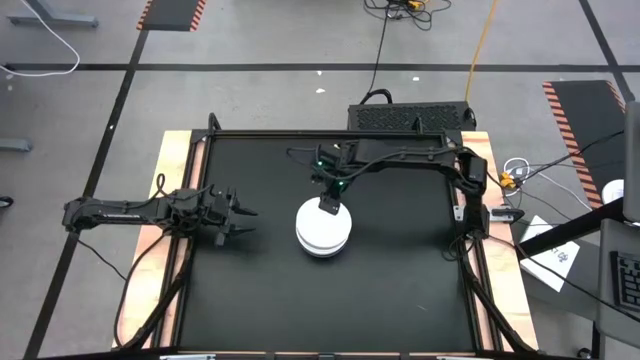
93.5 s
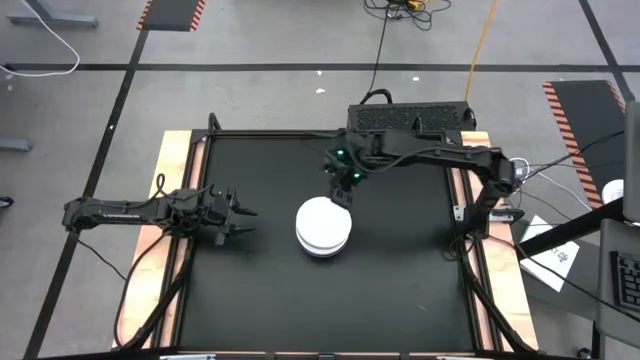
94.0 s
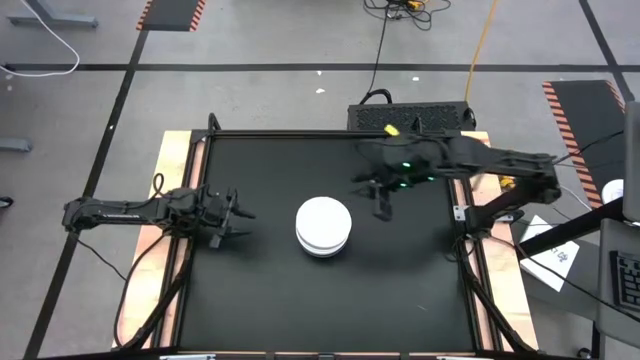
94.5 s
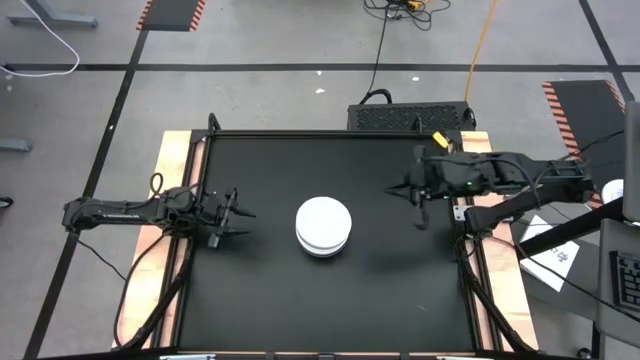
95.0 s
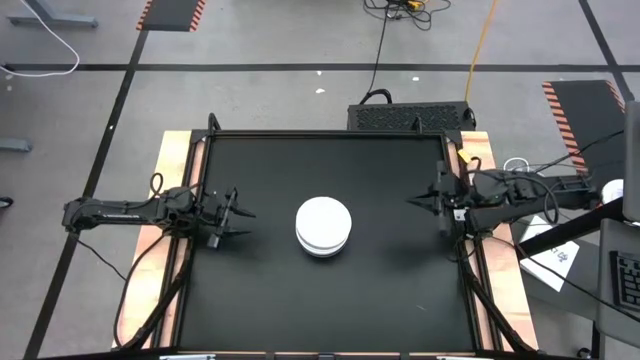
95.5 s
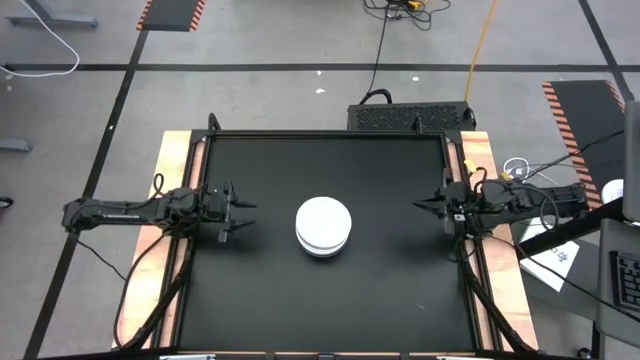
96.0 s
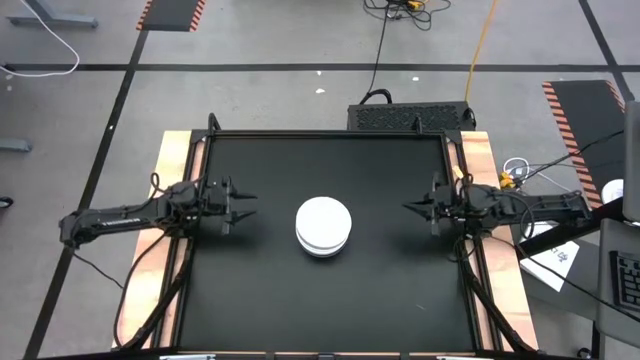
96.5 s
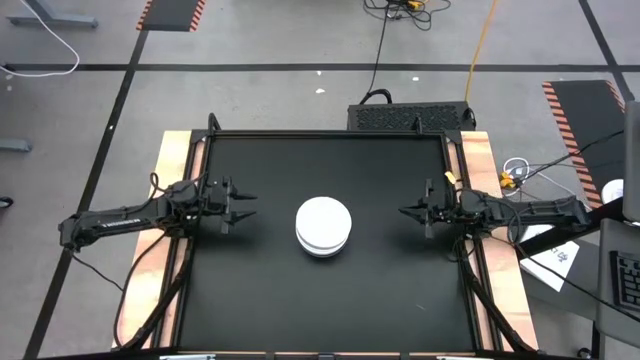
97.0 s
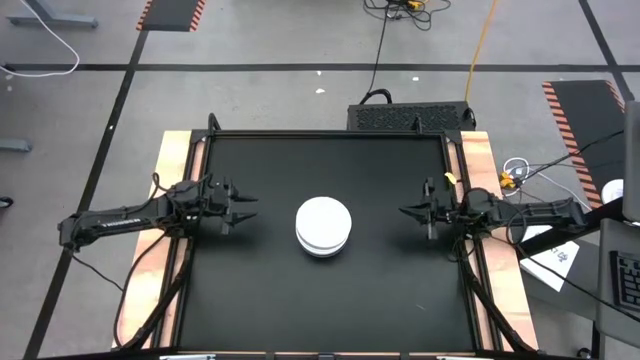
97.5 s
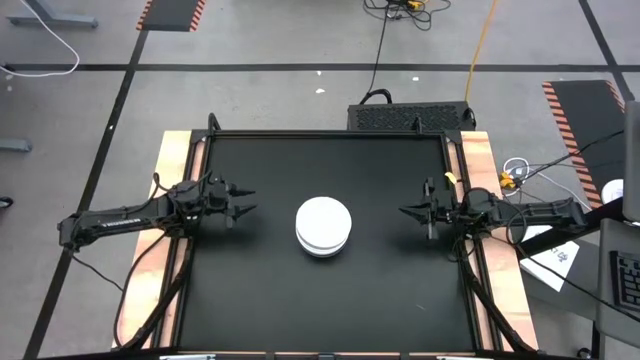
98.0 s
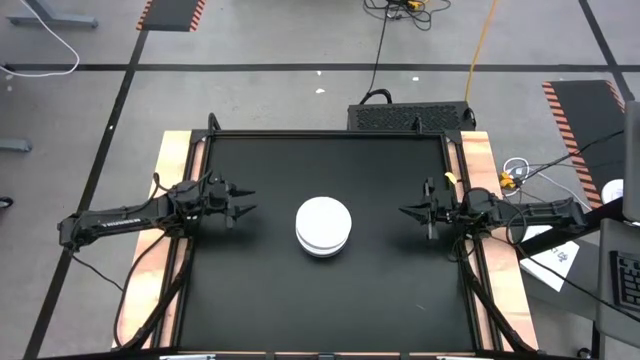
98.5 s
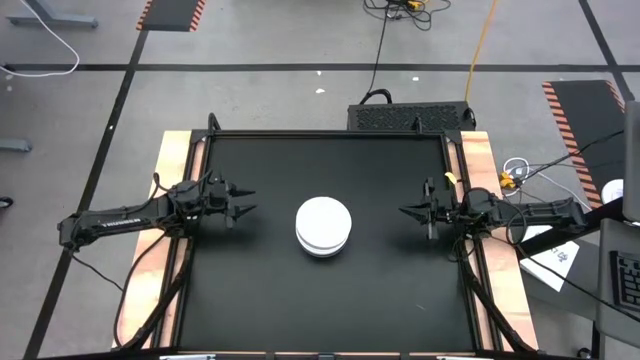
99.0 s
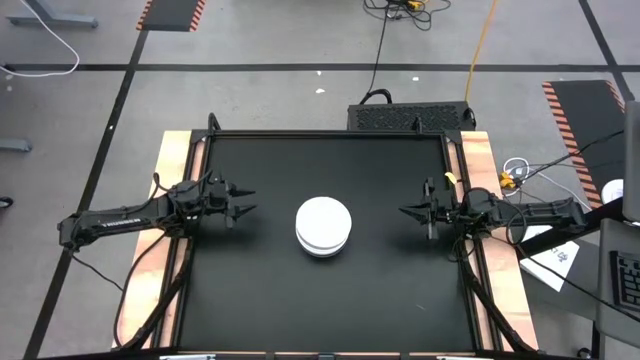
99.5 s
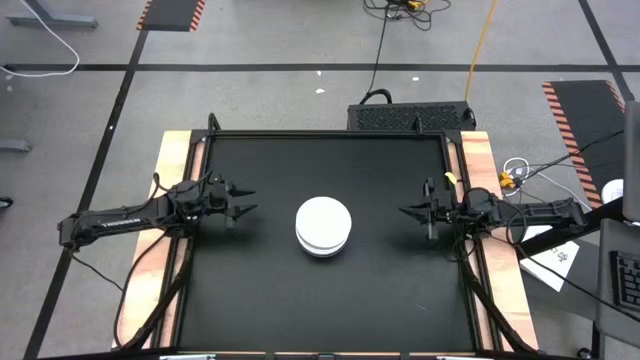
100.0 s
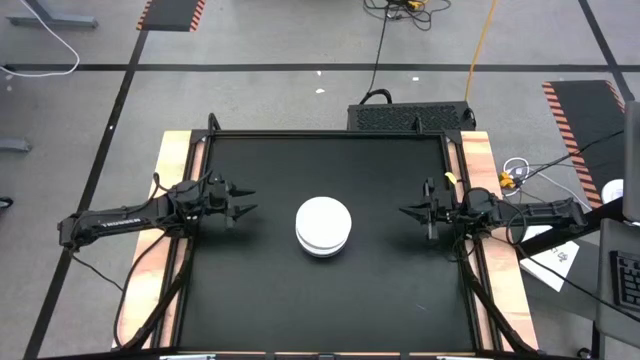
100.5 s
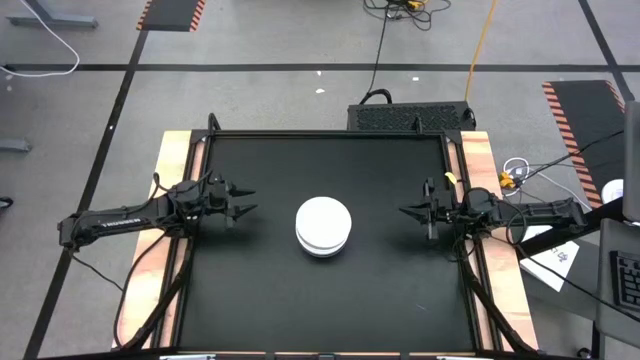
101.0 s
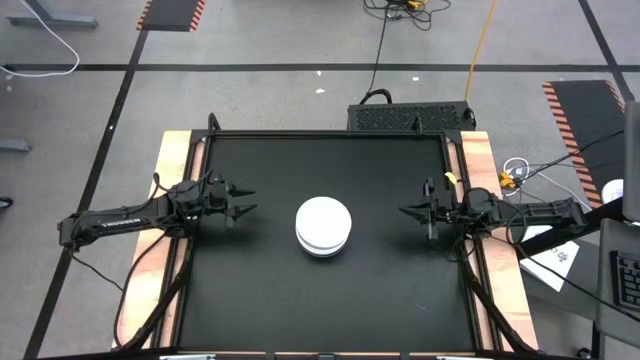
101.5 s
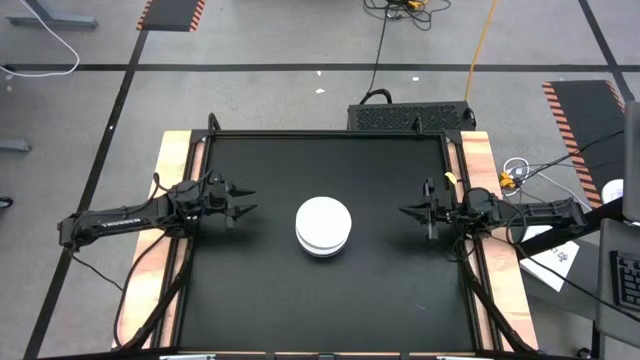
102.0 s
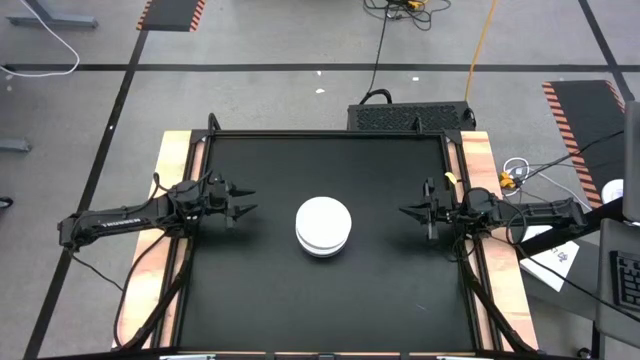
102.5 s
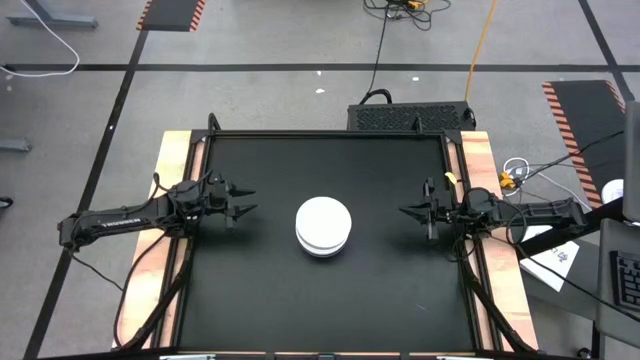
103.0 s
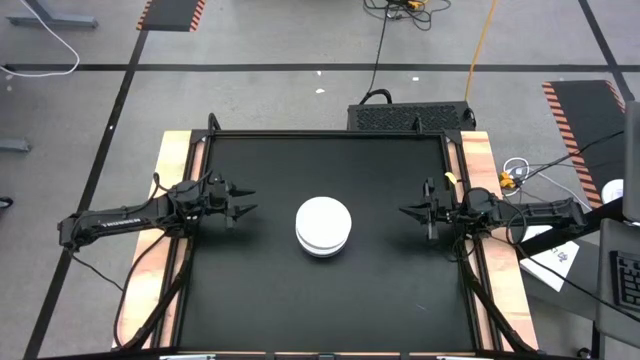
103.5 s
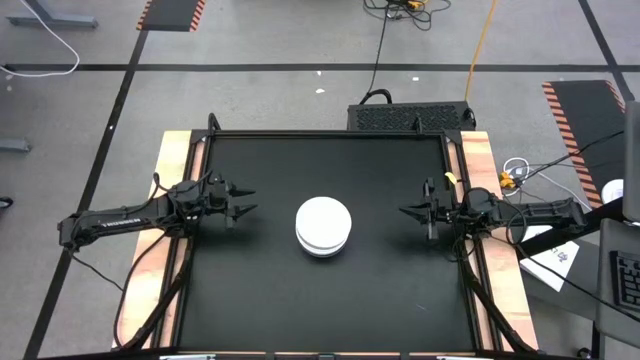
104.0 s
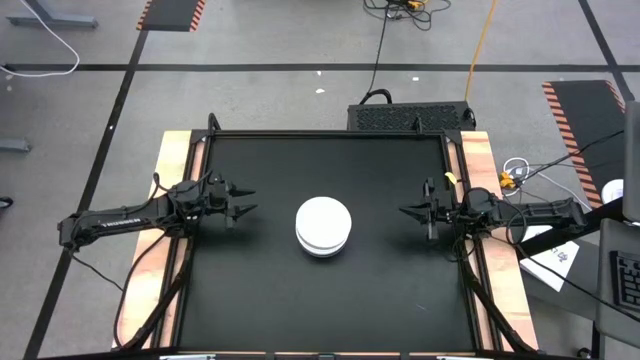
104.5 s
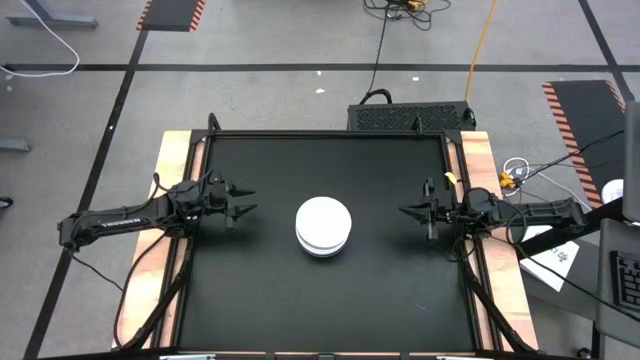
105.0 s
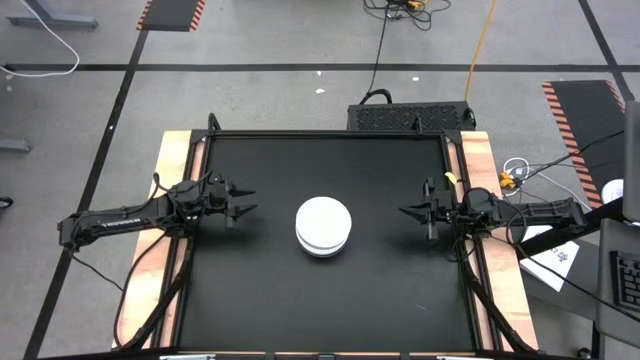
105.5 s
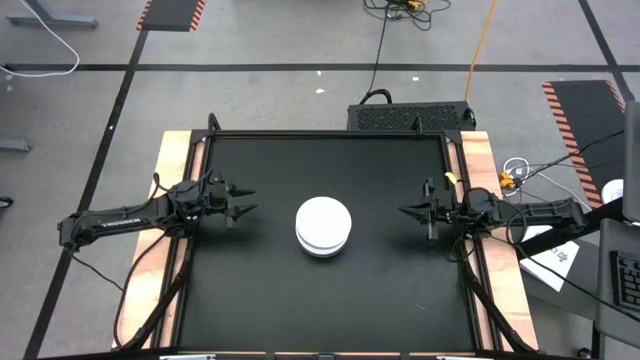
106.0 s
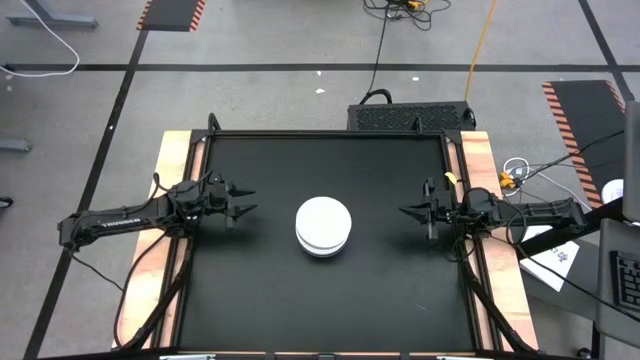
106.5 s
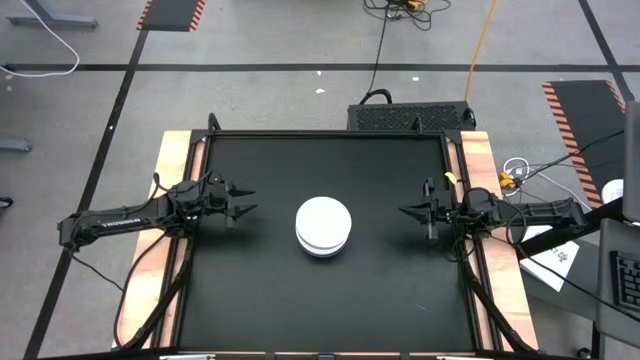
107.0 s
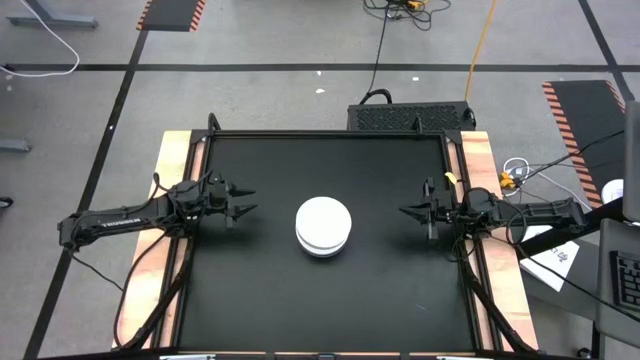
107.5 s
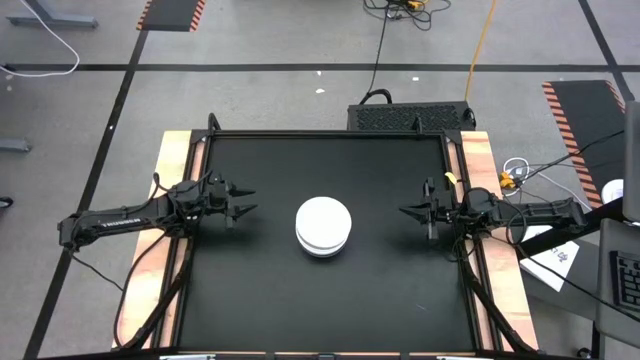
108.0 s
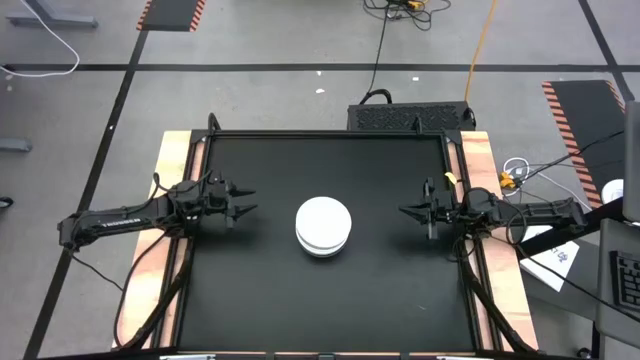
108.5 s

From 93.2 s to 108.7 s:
Task: Nest bowls inside each other
Return to Home Position

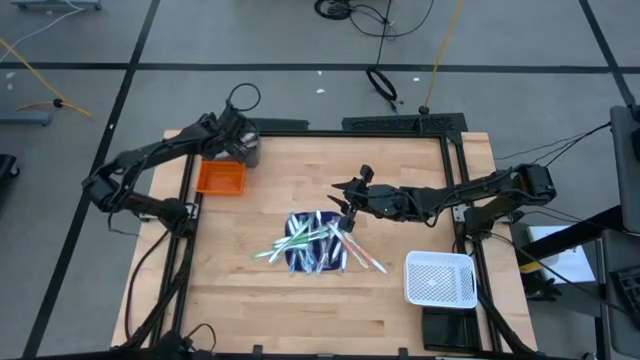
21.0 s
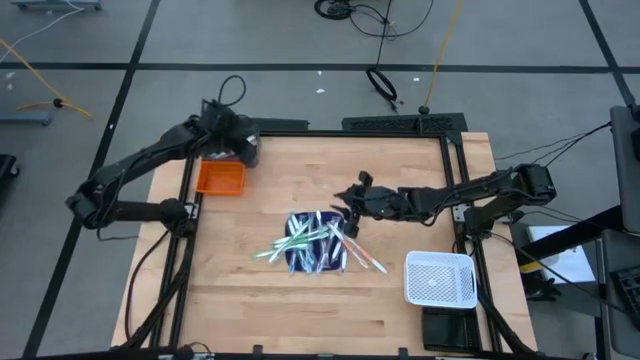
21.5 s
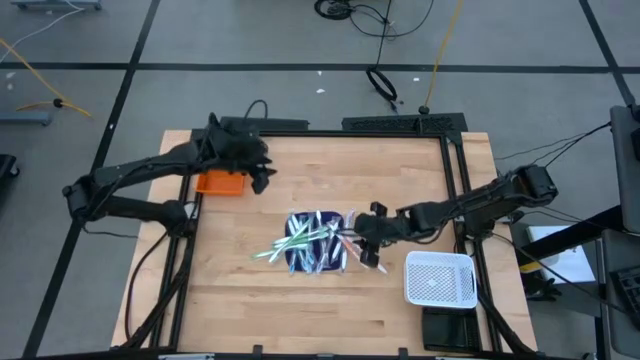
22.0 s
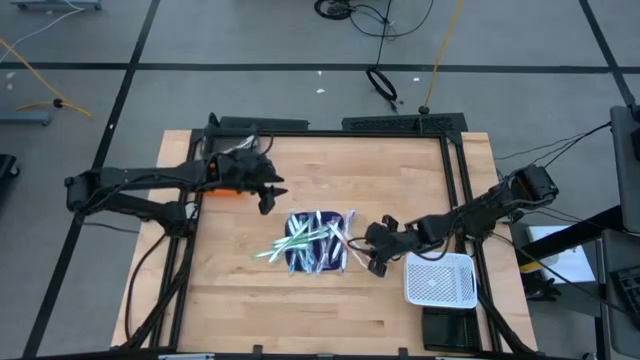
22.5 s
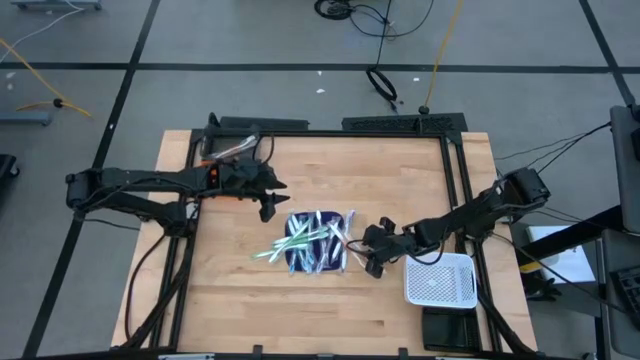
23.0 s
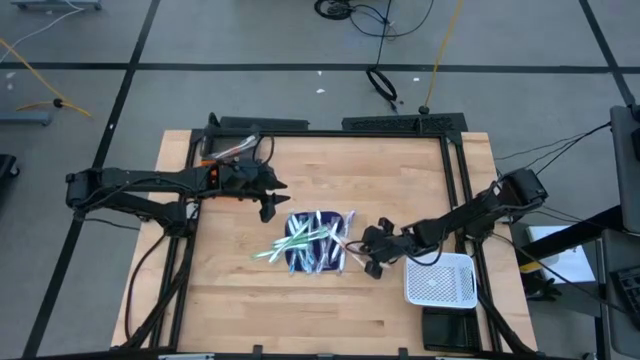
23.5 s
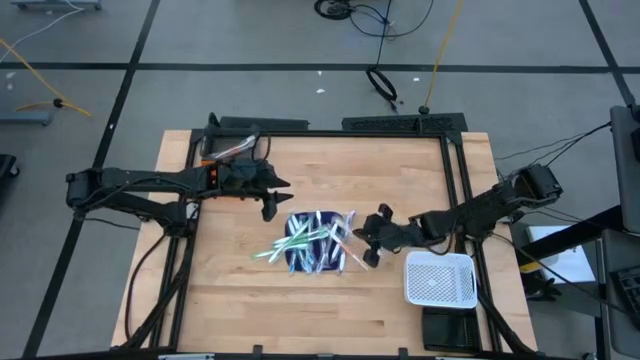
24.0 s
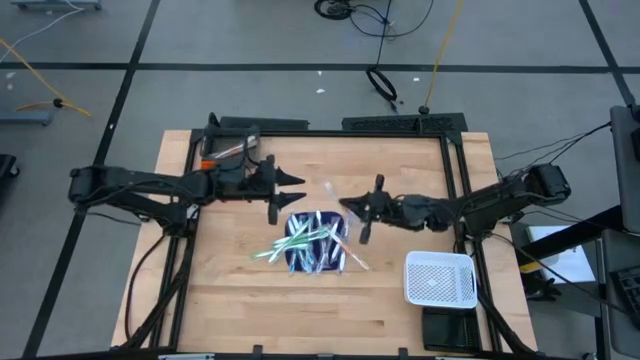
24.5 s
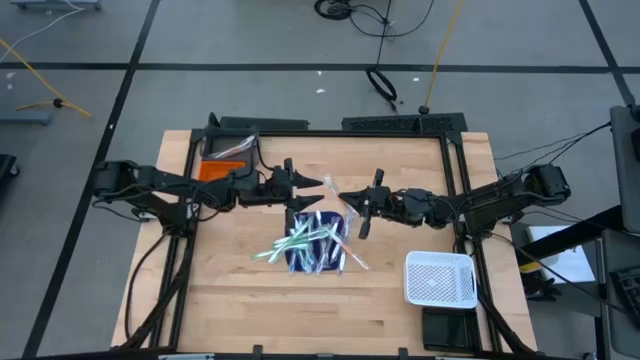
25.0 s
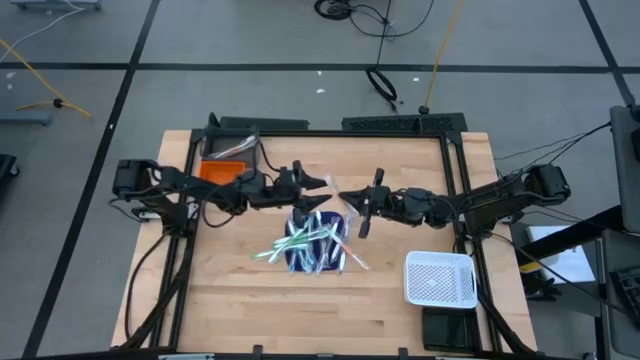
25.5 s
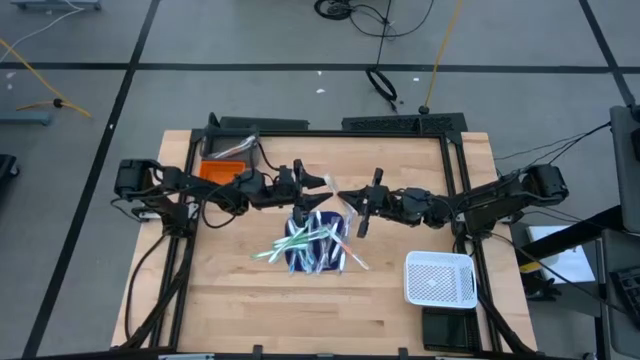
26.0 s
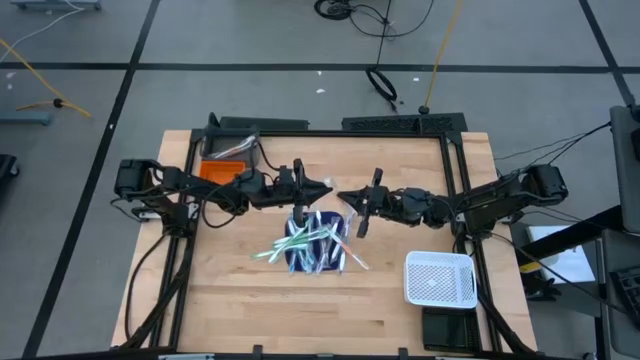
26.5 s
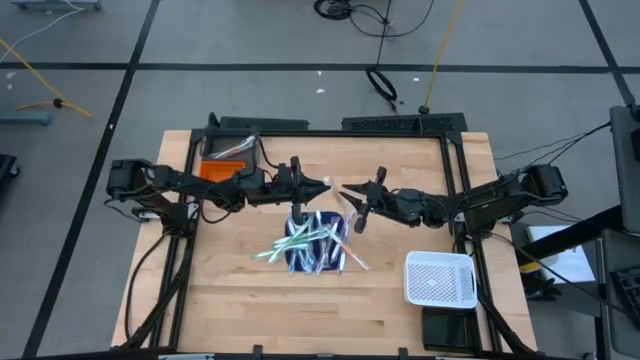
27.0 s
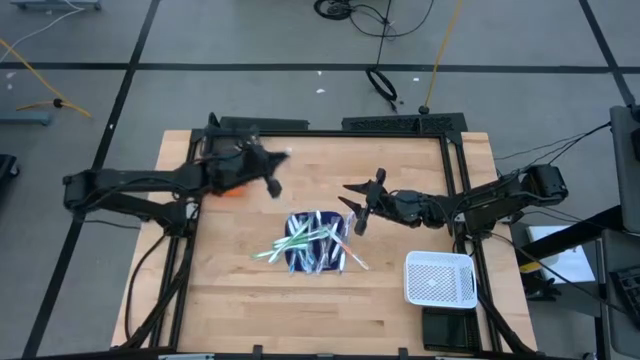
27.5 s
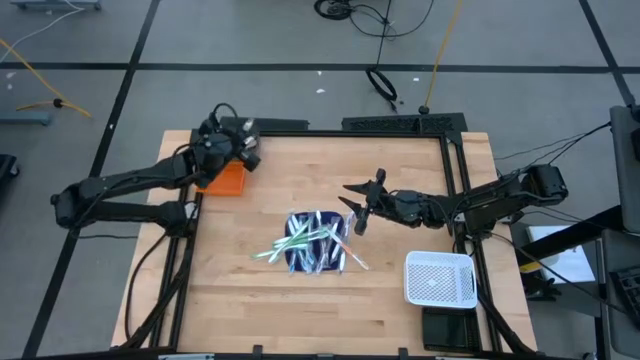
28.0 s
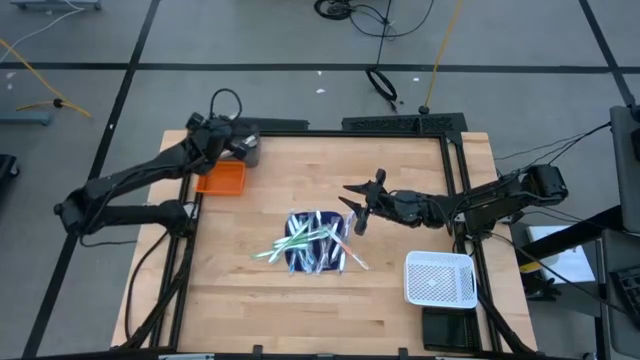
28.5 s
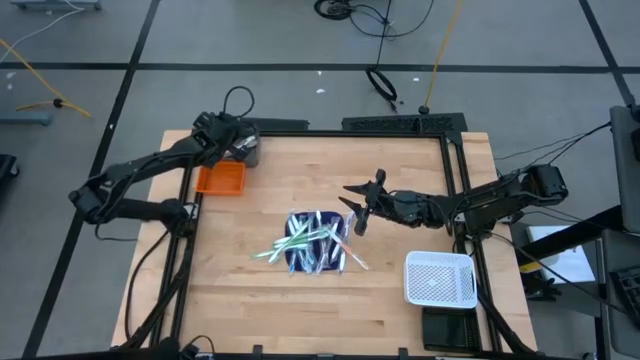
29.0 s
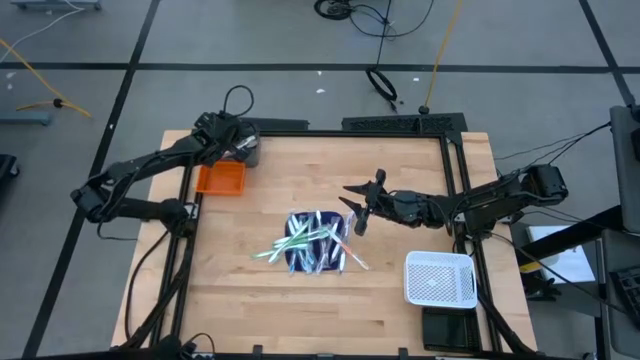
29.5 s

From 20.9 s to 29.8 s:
Task: Pick & Place Toothbrushes
Put the orange toothbrush into the transparent black bin
